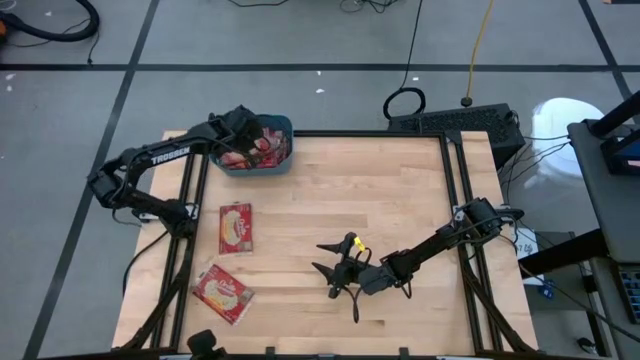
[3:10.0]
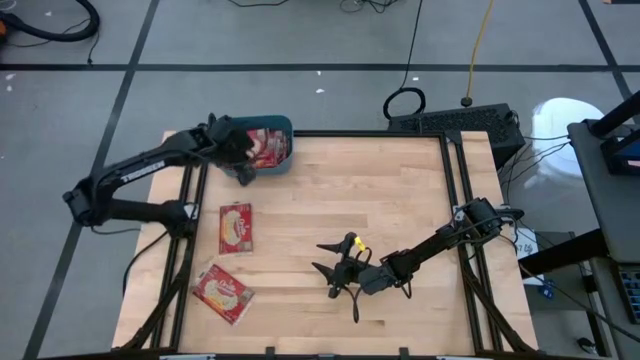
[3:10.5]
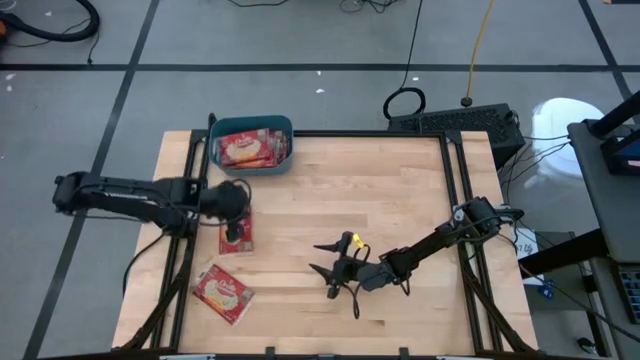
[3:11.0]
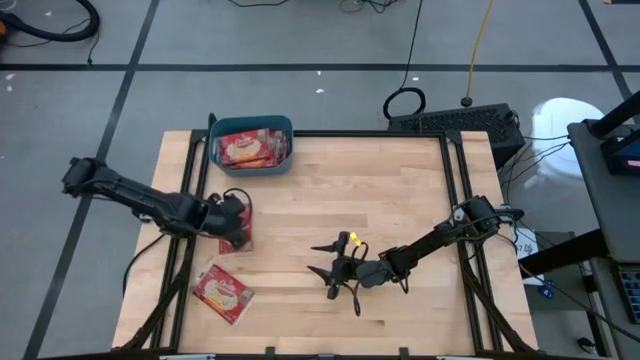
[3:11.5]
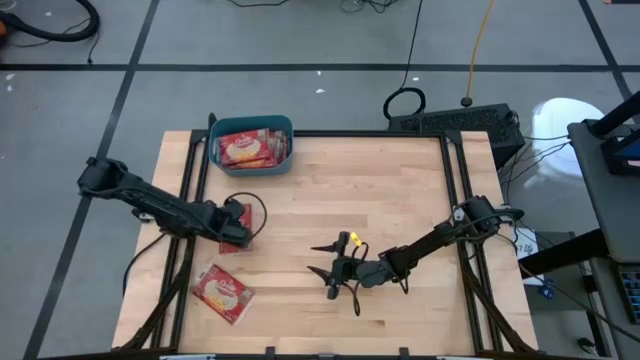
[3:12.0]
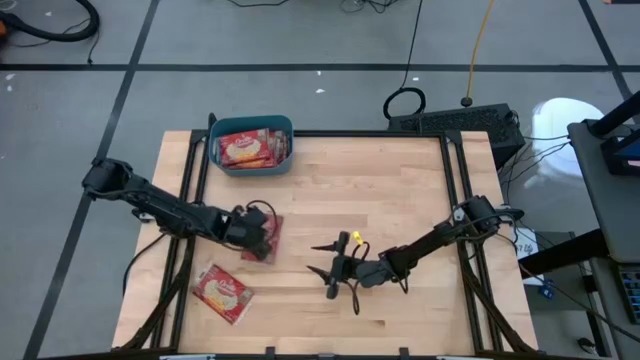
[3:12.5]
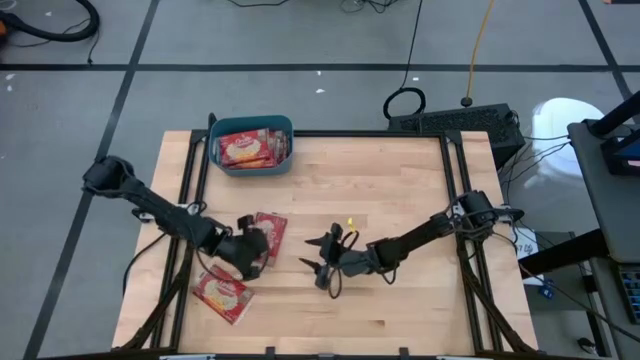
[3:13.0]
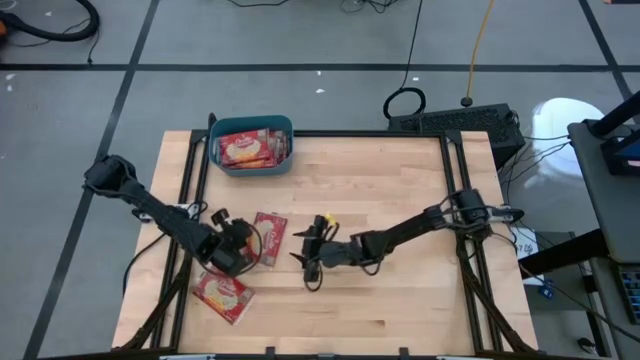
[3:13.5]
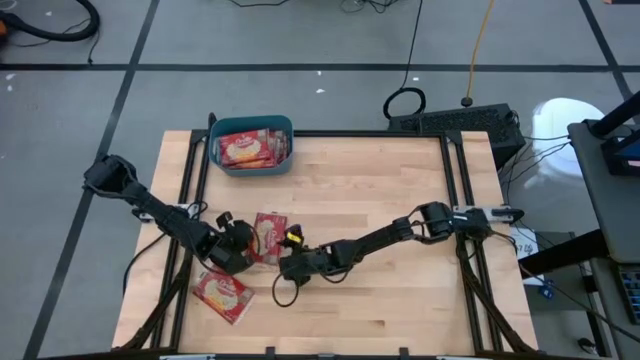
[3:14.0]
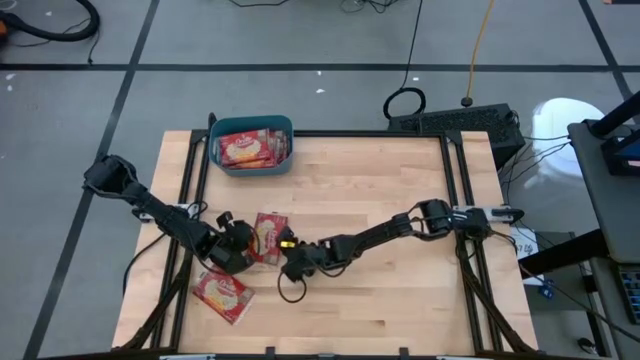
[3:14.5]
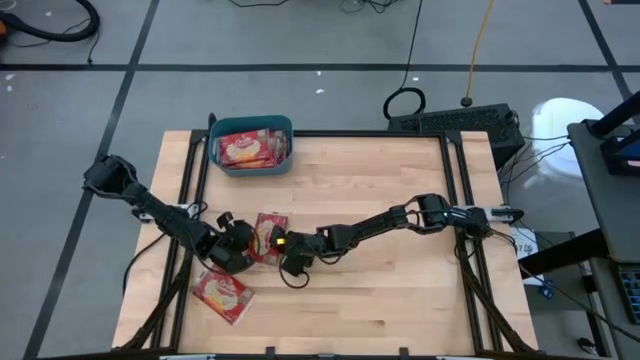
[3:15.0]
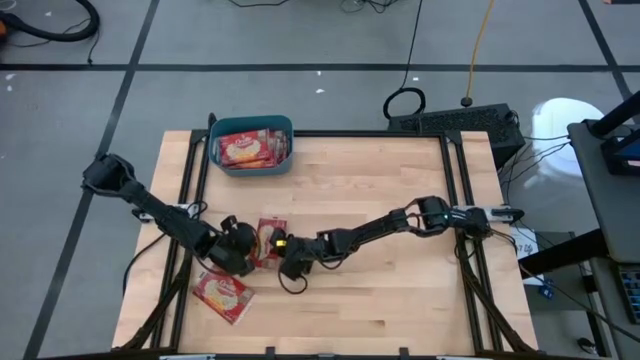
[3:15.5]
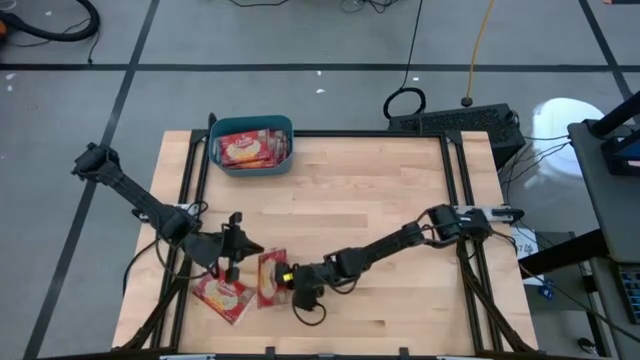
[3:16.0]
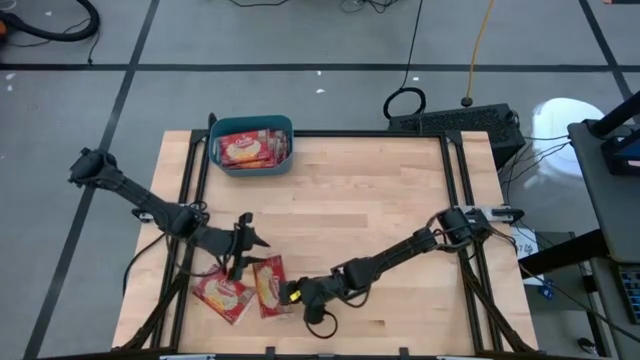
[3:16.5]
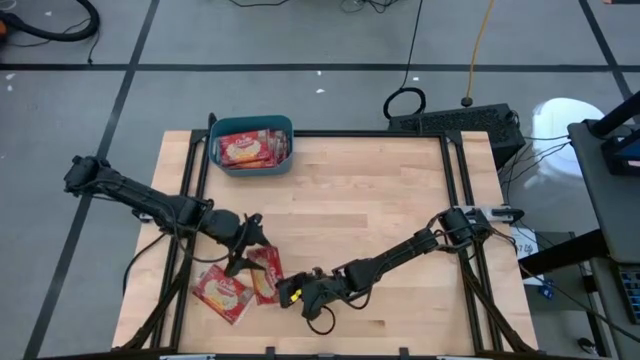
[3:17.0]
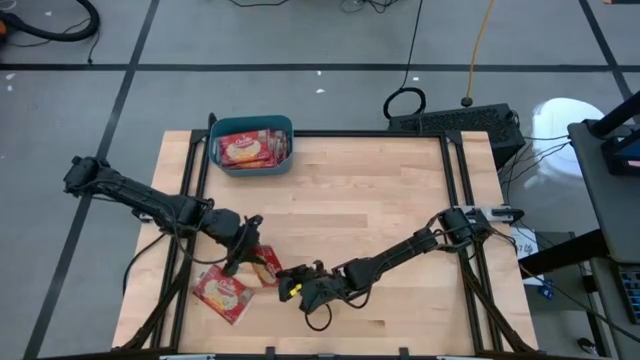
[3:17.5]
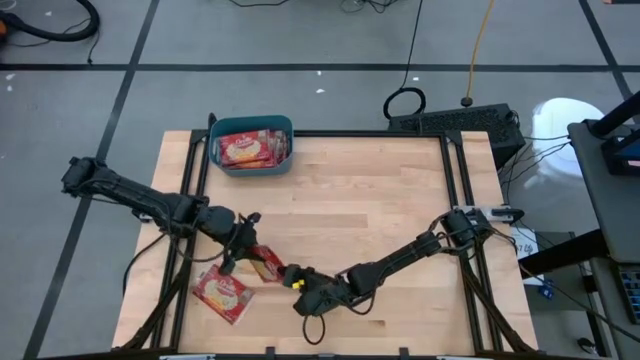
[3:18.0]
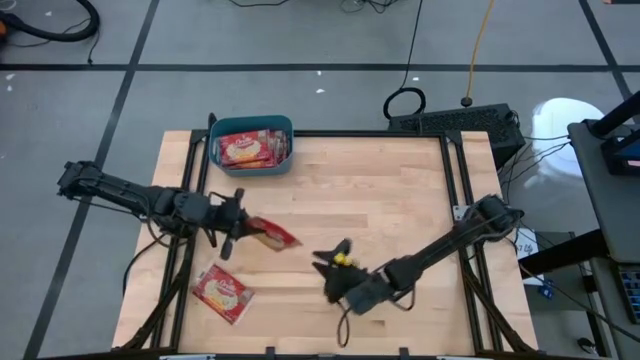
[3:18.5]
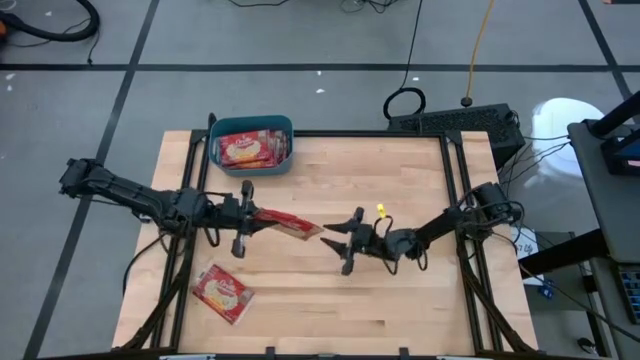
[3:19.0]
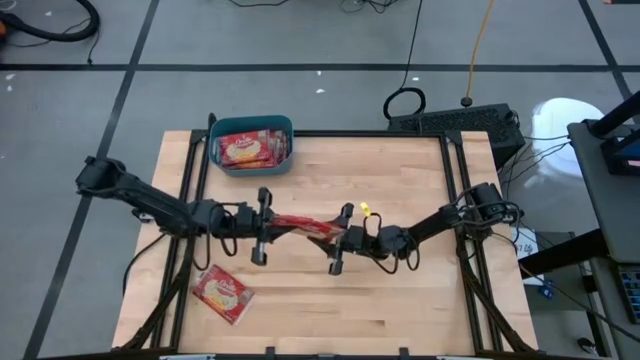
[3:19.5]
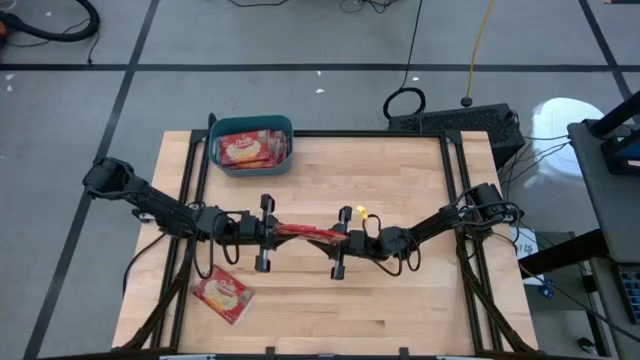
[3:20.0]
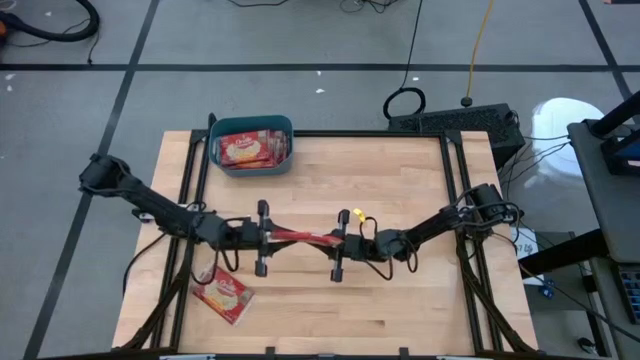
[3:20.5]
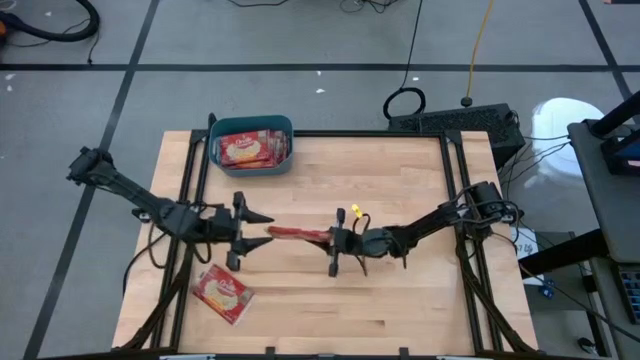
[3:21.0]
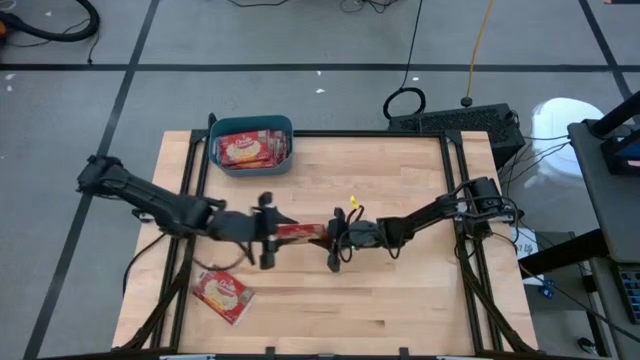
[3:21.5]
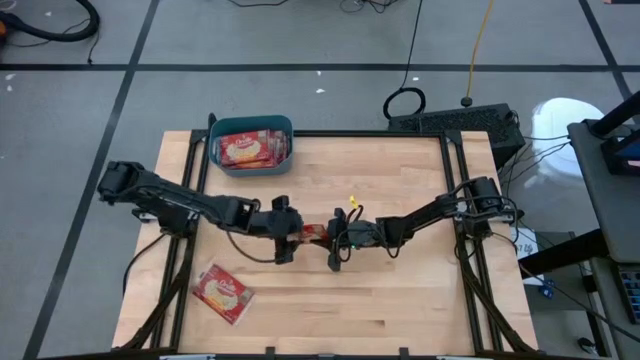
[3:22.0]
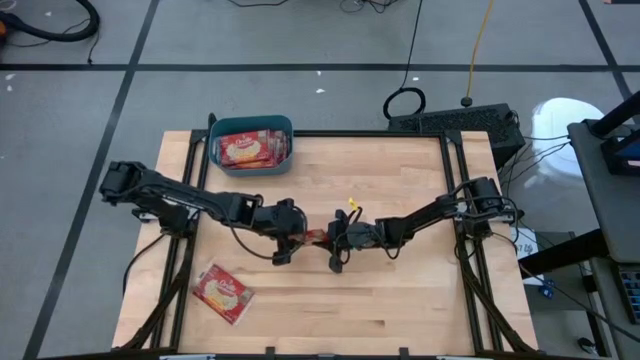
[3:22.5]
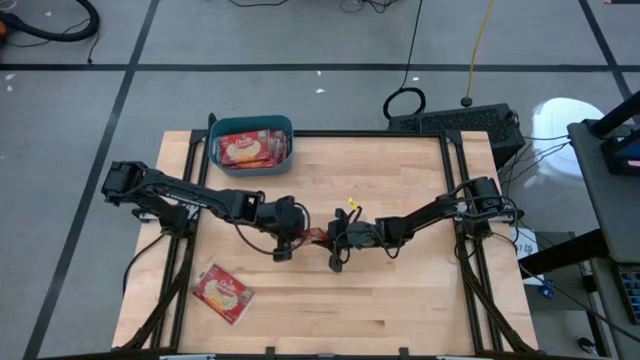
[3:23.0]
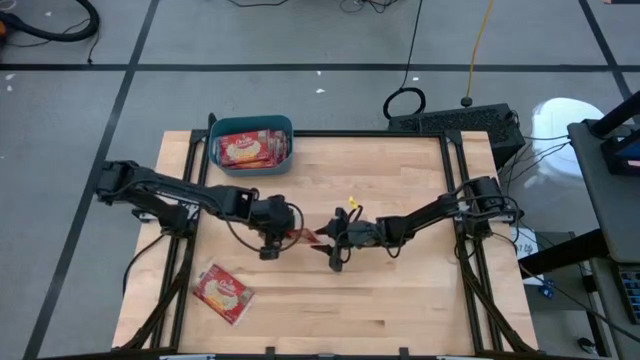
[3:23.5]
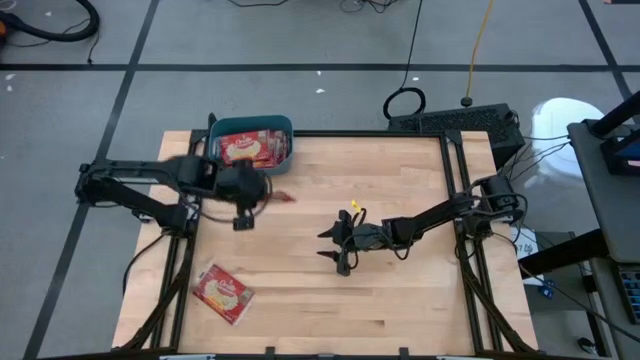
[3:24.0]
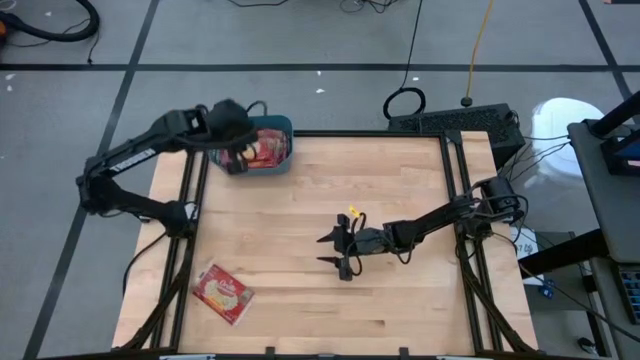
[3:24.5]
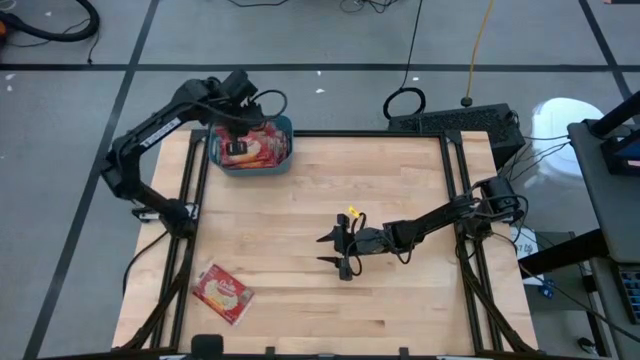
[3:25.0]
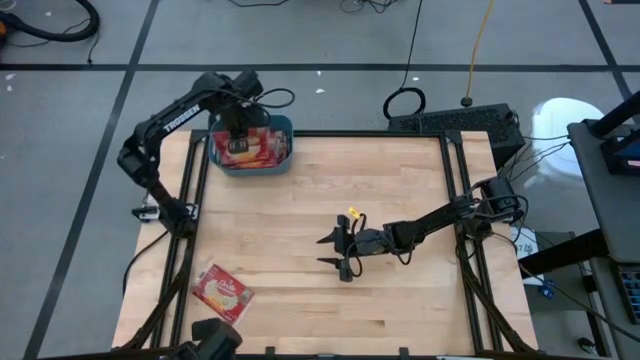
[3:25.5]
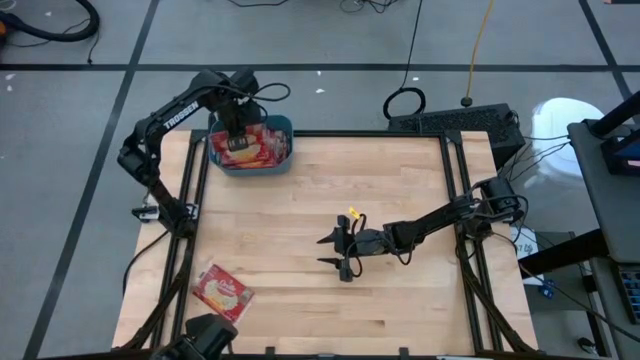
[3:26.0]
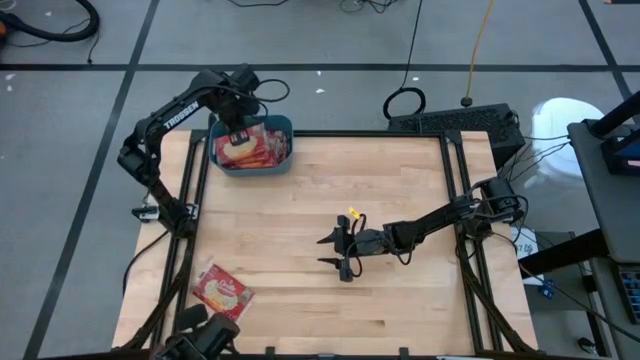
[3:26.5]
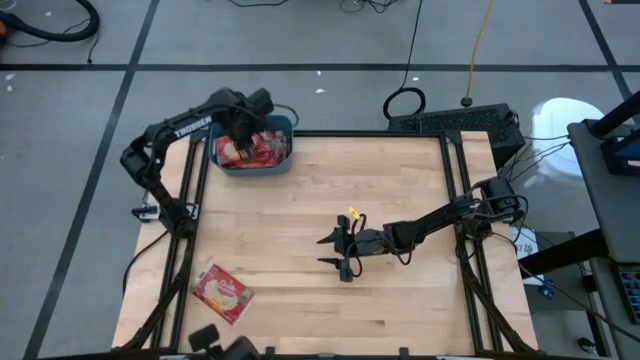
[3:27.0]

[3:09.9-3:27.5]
Task: Sort popcorn bags into baskets
Put the red popcorn bag into the blue bin

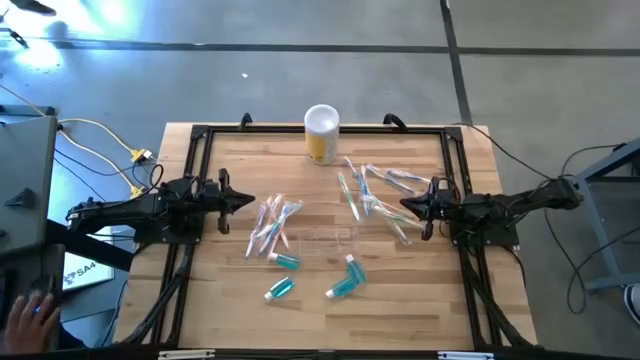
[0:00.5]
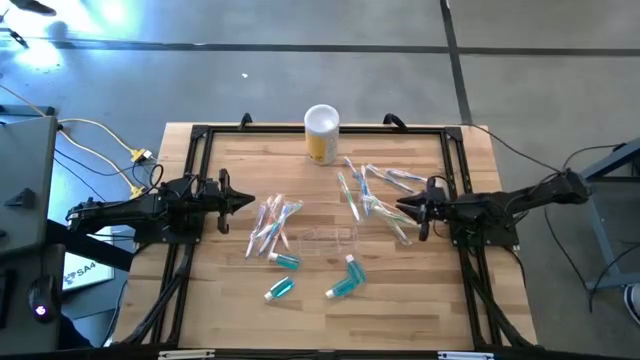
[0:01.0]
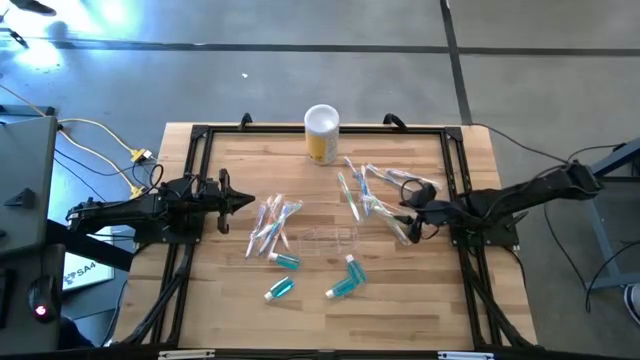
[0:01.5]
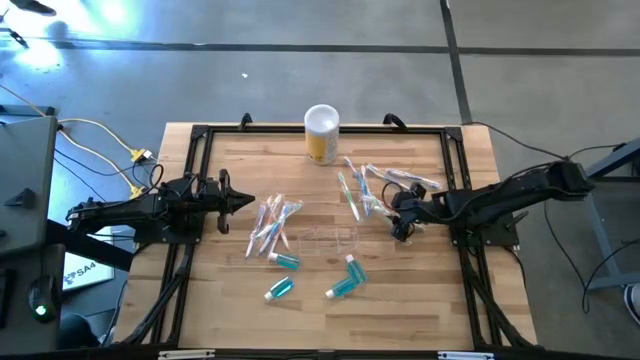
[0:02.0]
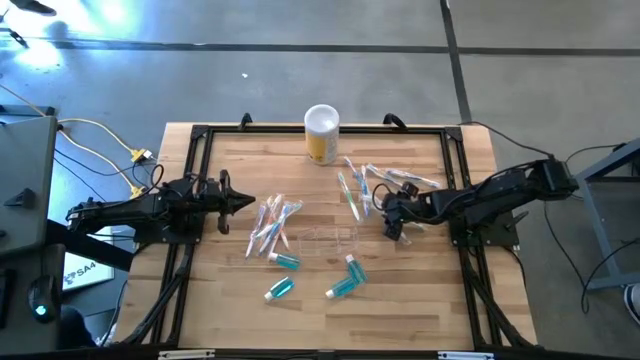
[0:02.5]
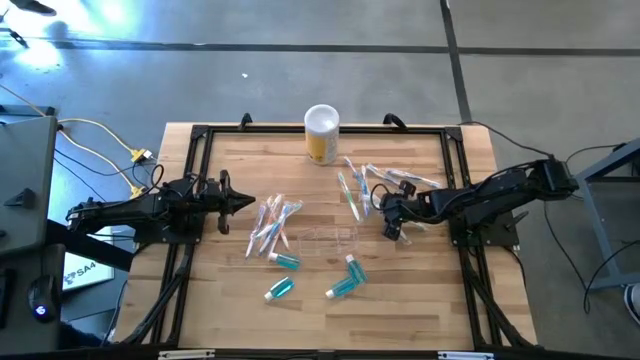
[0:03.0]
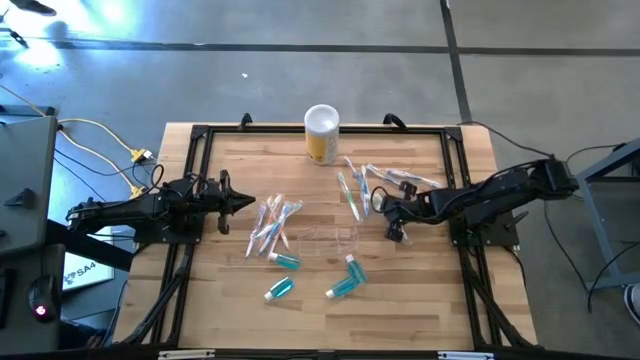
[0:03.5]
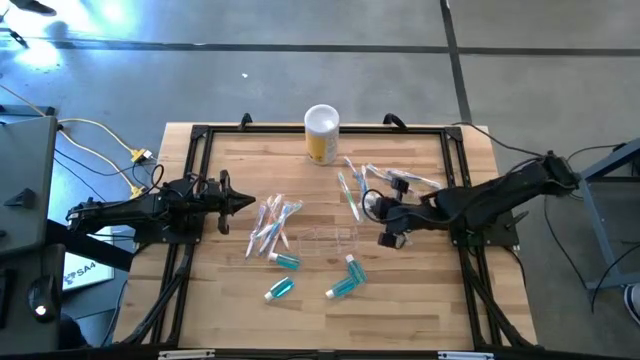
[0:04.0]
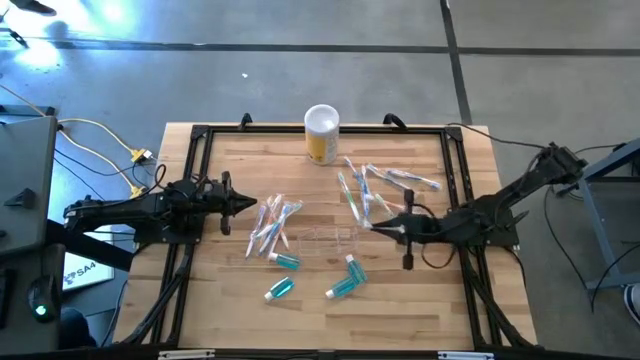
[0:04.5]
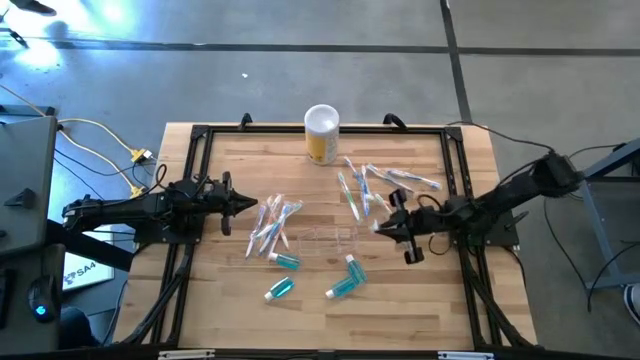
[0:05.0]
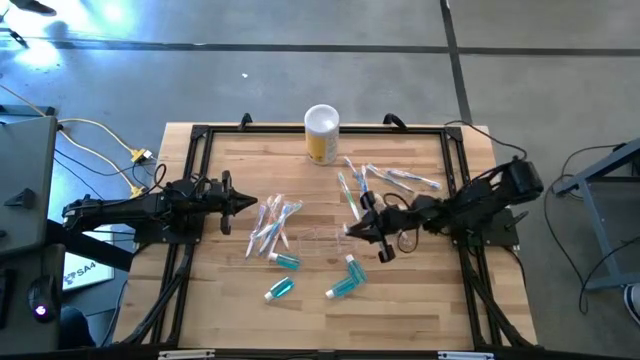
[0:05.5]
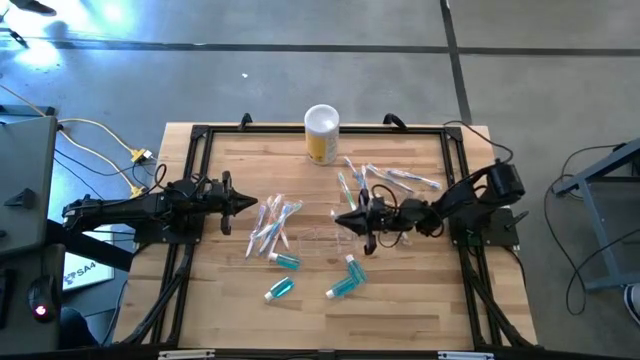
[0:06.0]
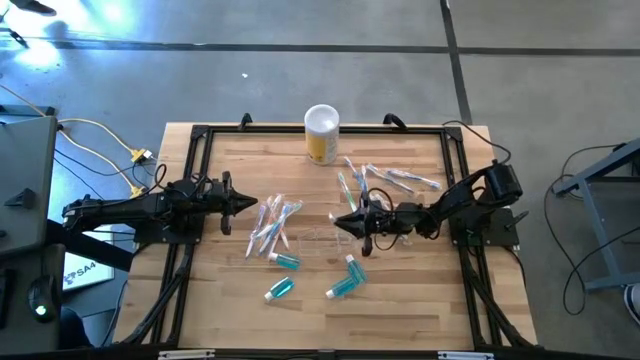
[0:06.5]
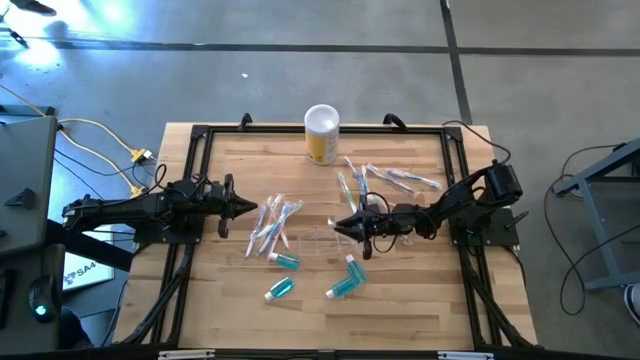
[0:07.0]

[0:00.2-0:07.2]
Task: Pick & Place toothbrushing station
Put the green toothbrush in the transparent organizer
